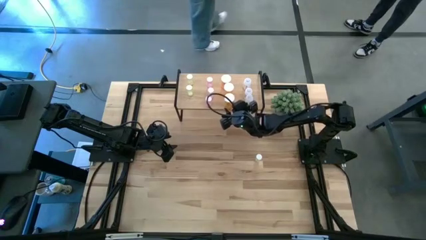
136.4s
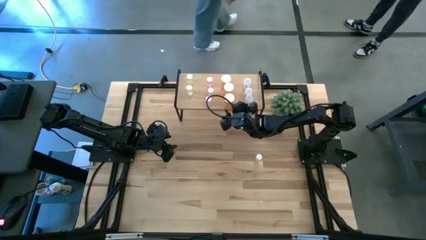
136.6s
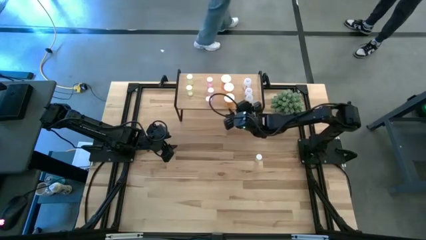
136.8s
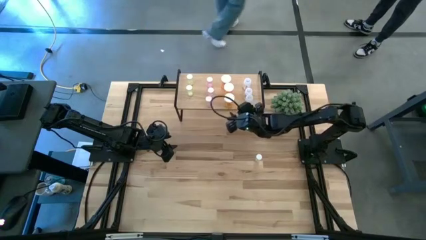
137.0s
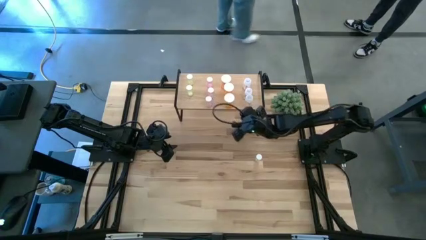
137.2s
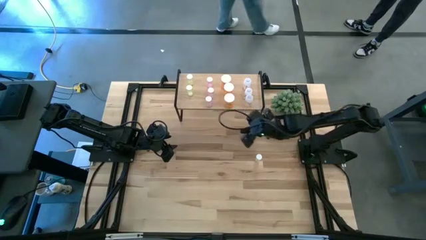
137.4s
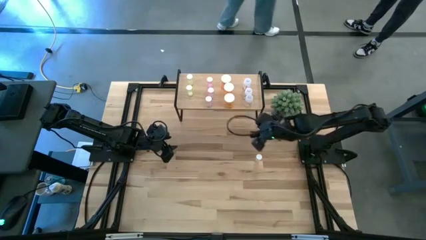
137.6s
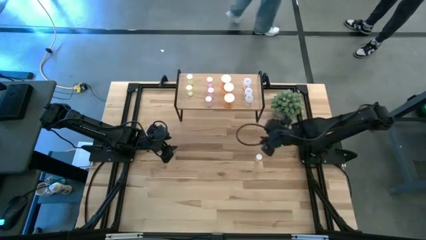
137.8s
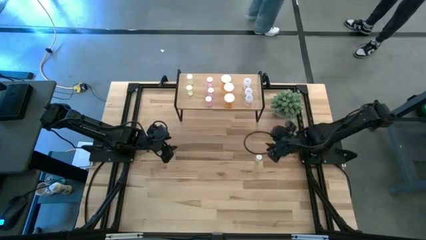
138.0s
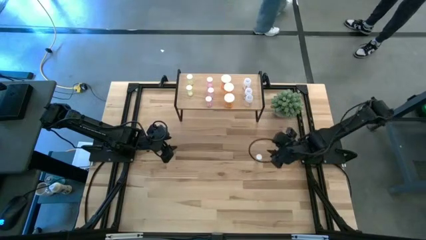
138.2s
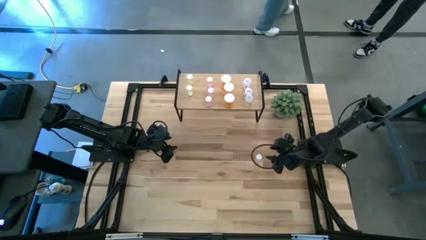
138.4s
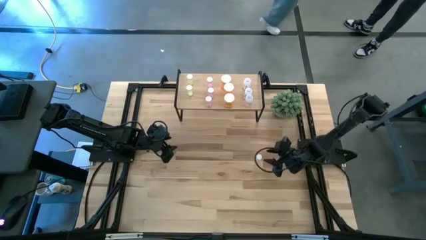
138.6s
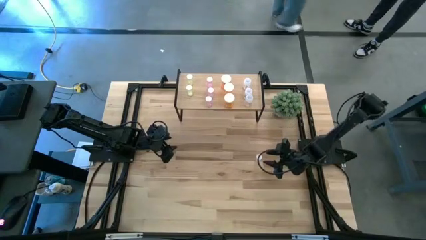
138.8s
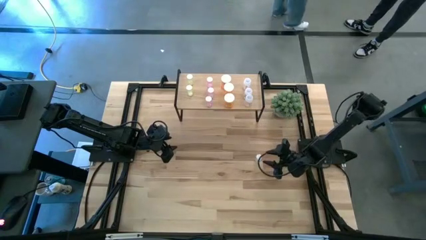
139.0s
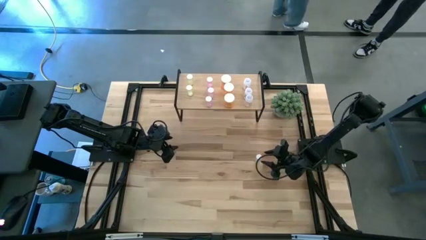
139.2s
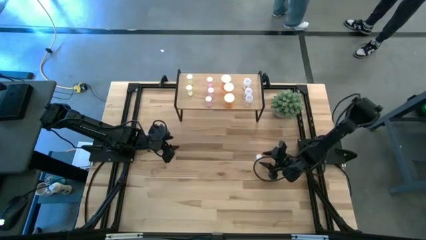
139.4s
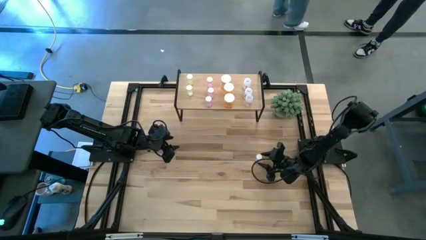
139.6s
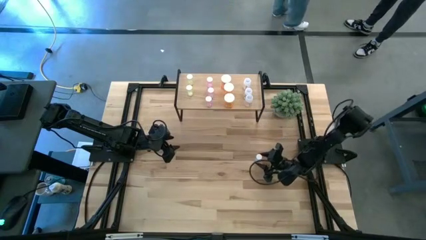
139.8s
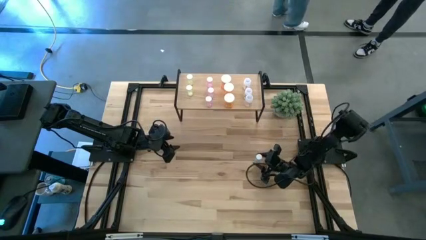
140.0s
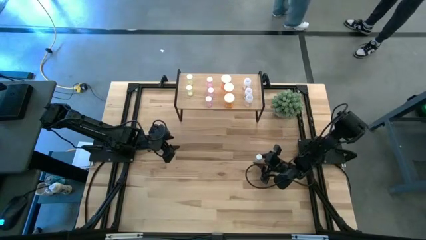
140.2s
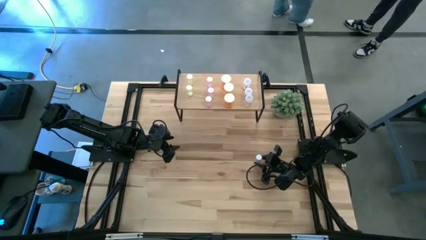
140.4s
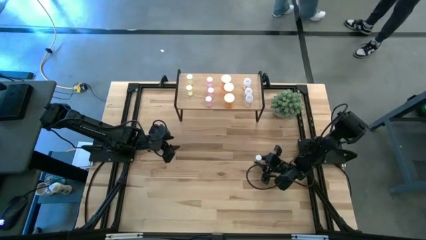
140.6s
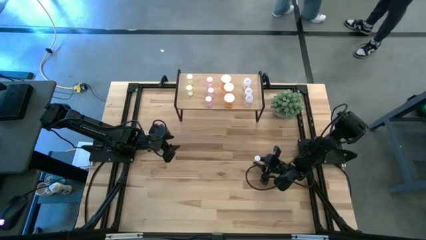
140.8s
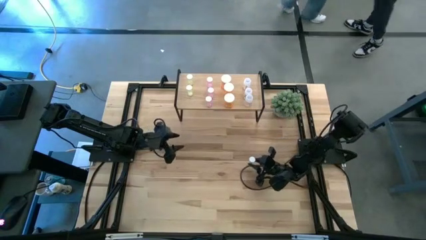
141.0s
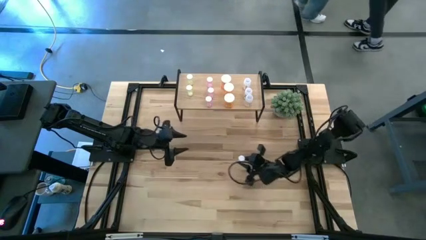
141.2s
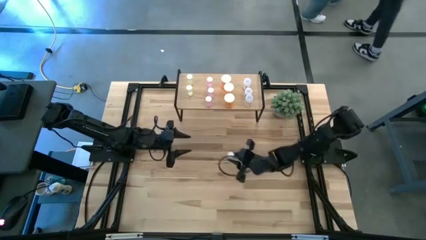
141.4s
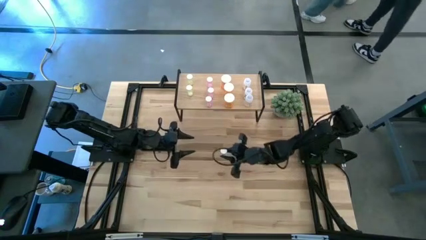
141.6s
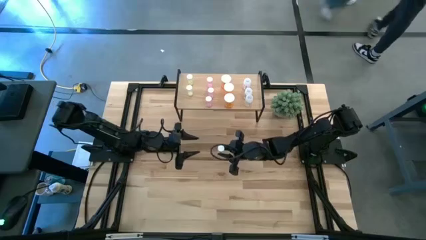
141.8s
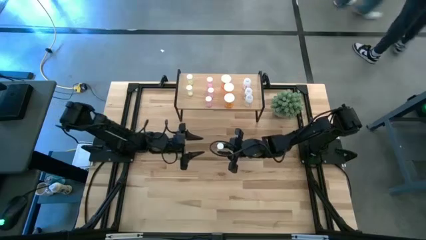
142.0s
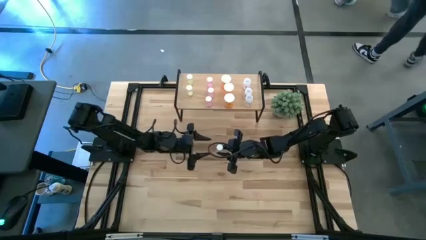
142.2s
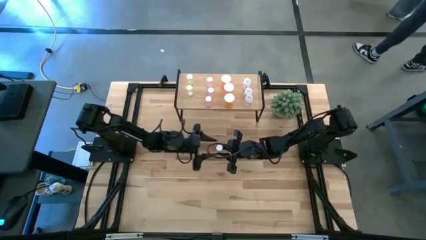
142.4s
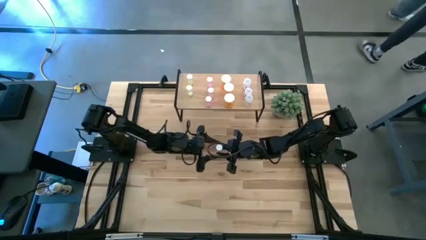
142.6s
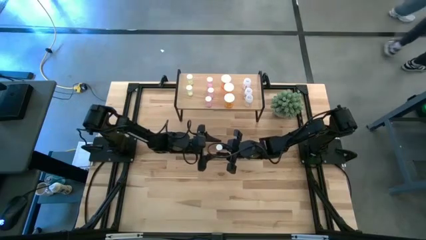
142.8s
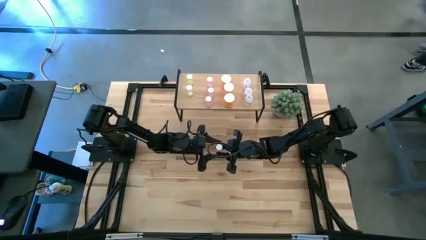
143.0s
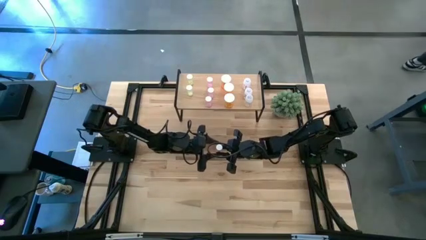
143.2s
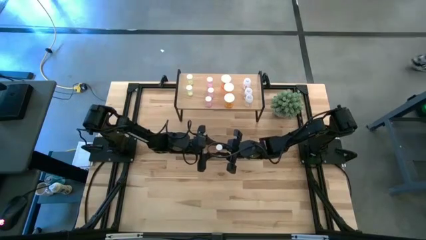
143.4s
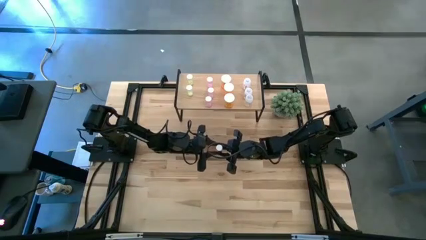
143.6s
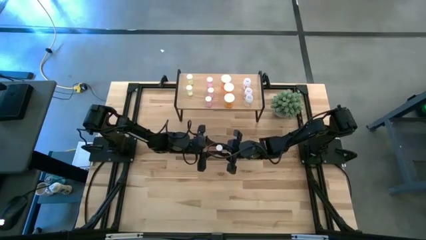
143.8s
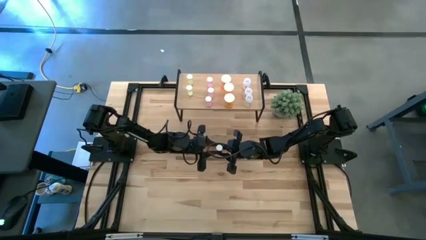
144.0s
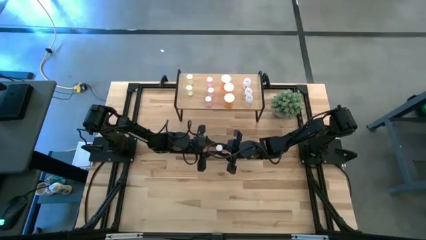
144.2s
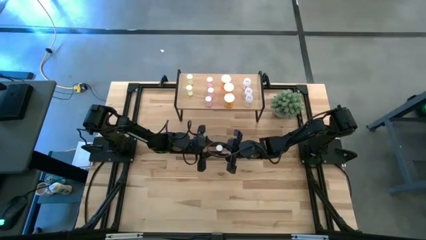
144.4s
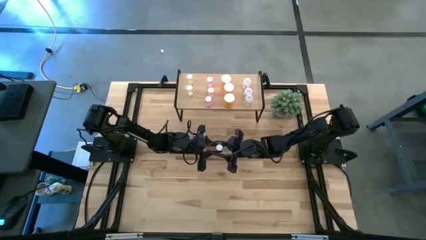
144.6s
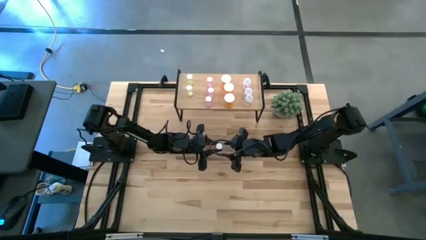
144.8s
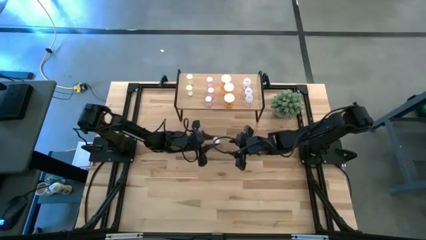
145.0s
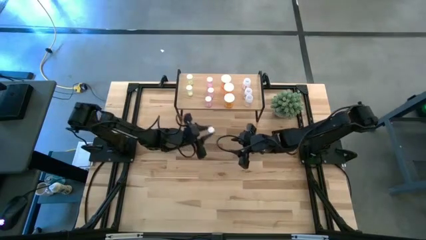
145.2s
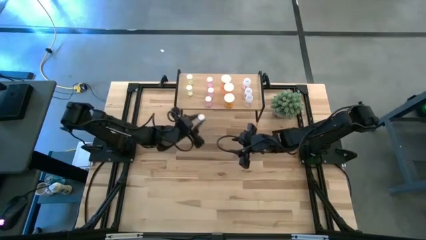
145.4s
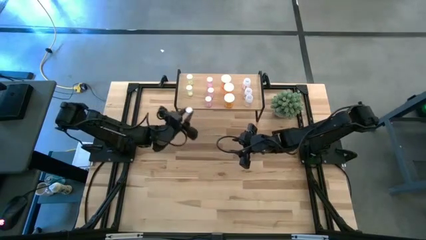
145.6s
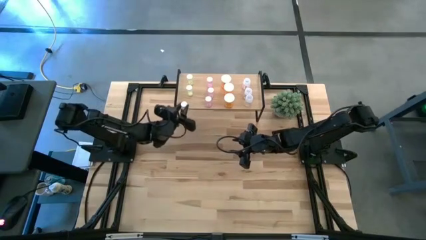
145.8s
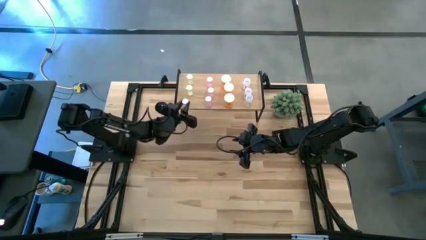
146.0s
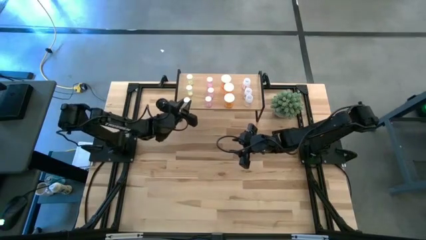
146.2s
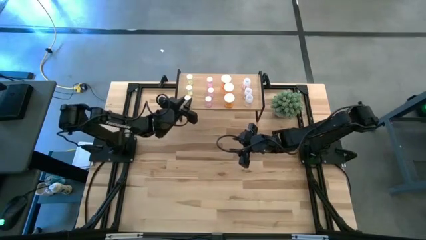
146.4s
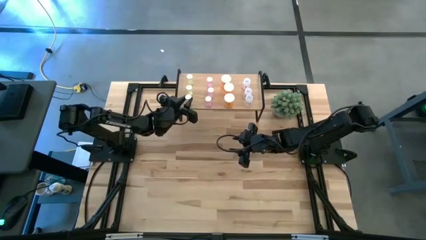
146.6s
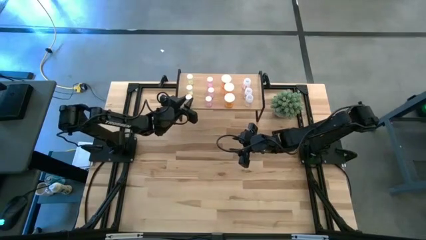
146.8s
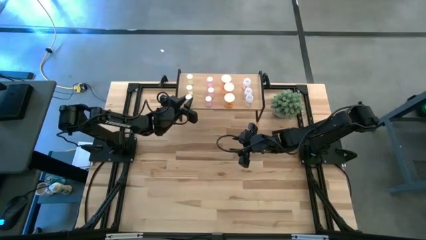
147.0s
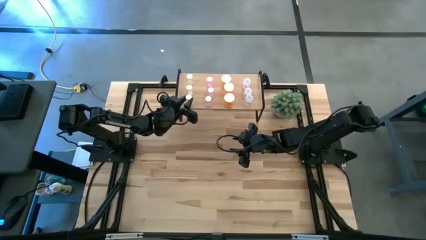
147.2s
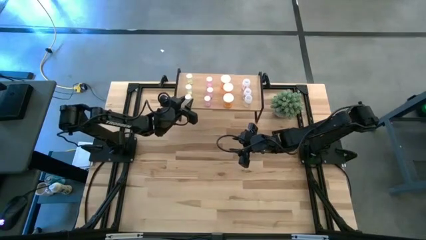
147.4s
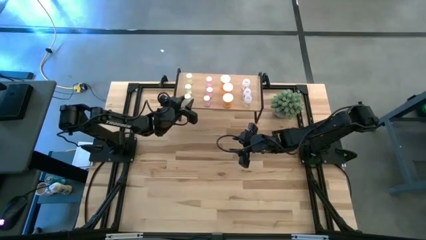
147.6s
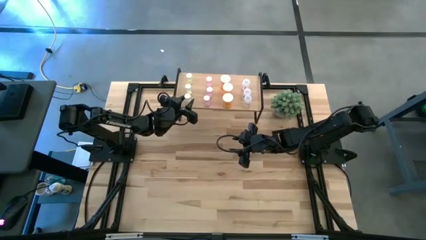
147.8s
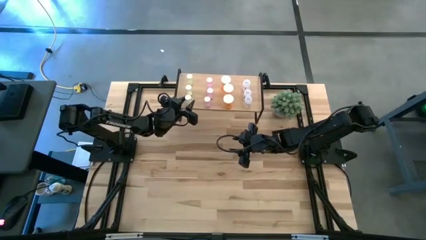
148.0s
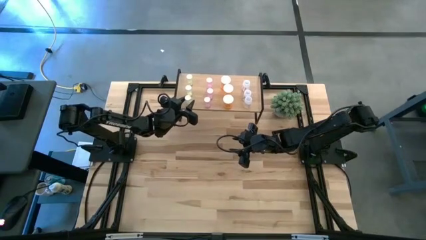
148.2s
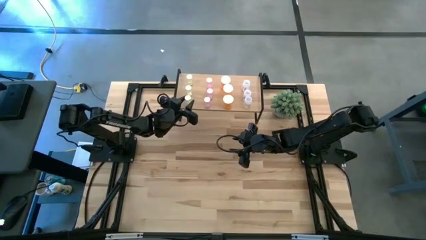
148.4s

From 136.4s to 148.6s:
Task: Pick and place medicine bottles onto shelf by color
Put the green pill bottle aligned with the other green pill bottles on the shelf

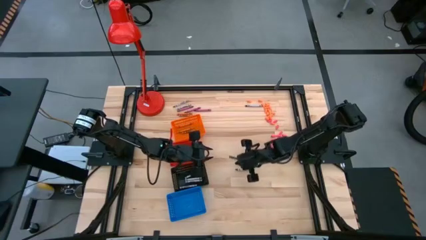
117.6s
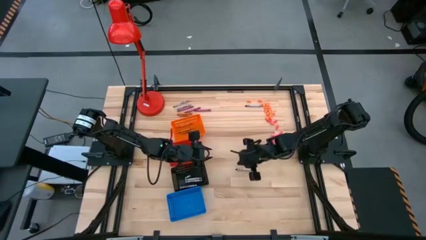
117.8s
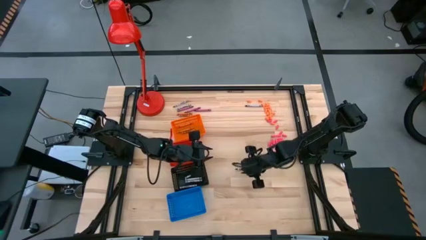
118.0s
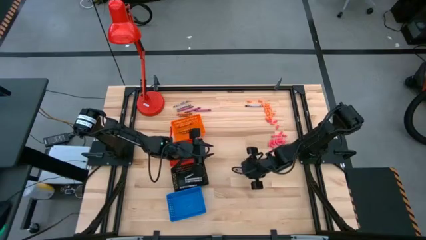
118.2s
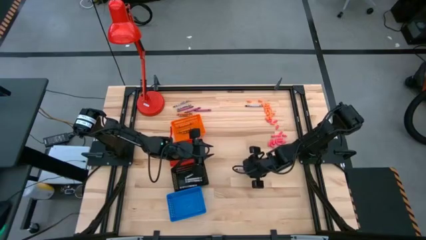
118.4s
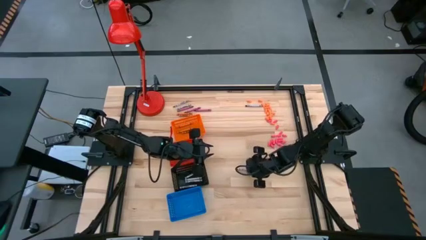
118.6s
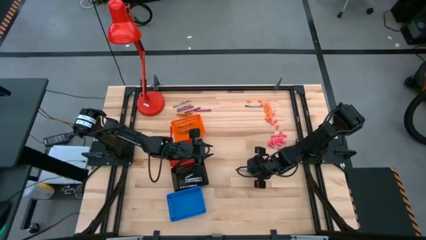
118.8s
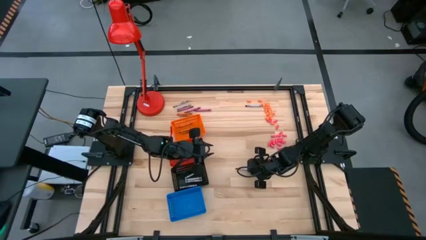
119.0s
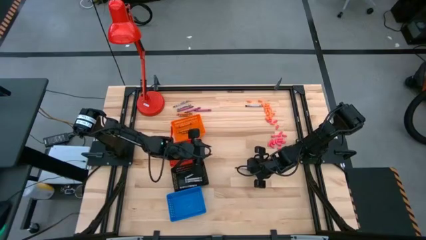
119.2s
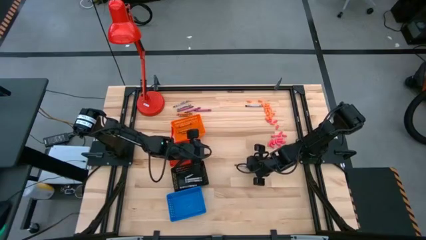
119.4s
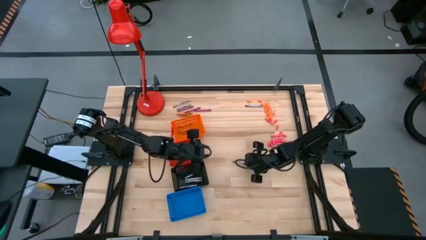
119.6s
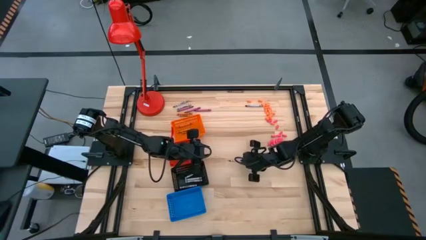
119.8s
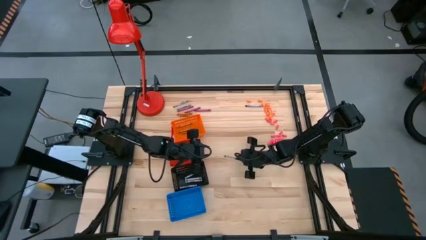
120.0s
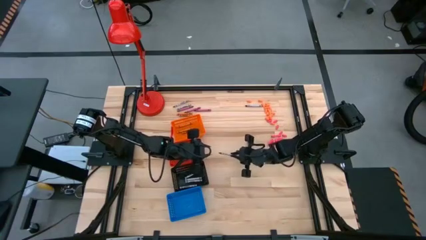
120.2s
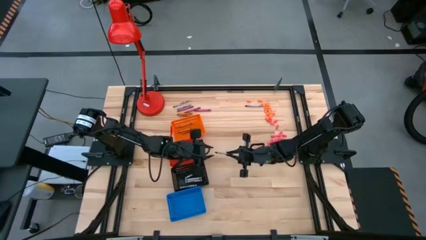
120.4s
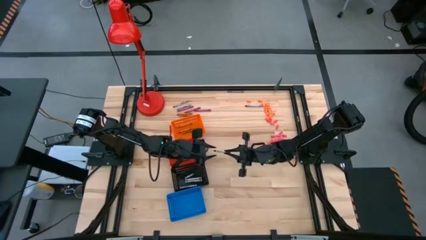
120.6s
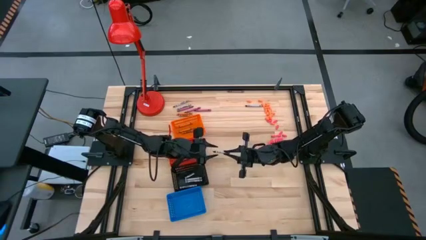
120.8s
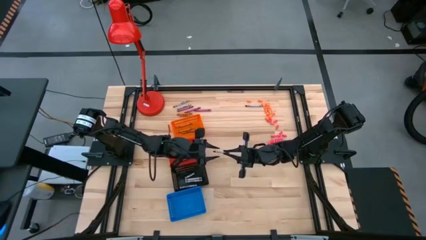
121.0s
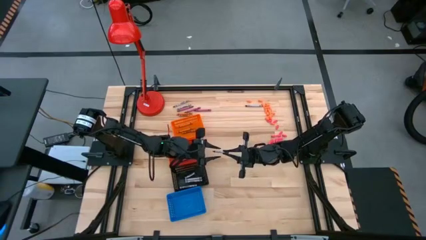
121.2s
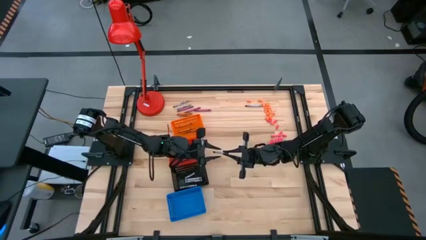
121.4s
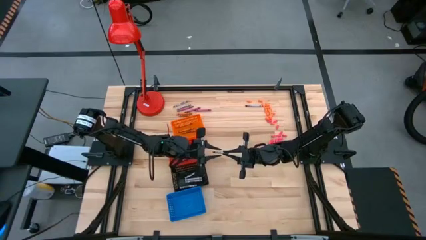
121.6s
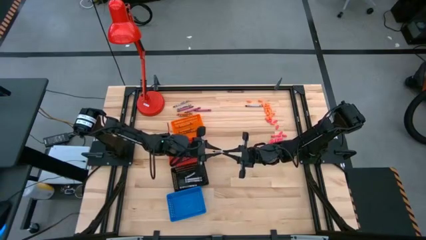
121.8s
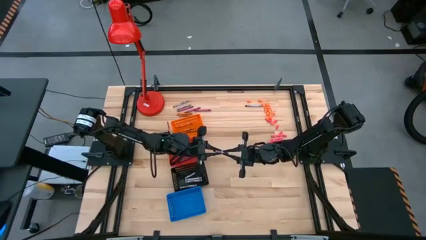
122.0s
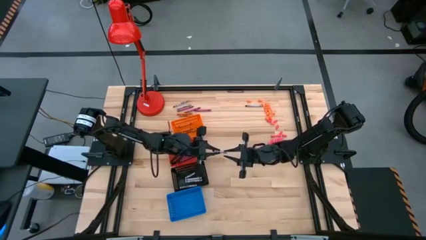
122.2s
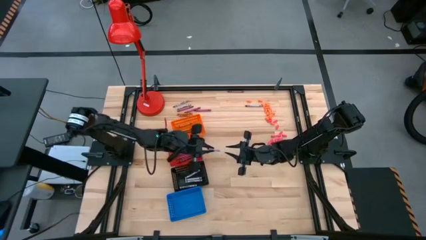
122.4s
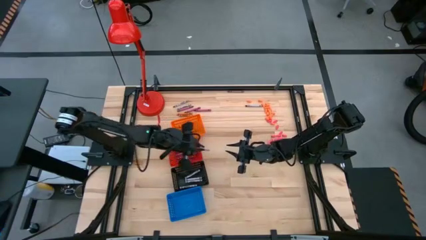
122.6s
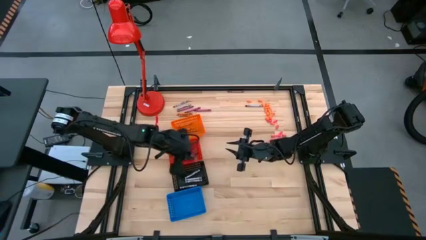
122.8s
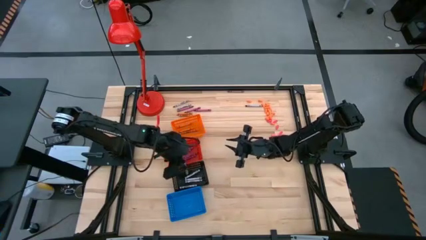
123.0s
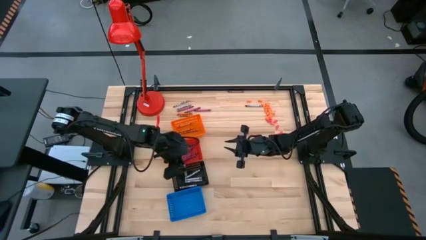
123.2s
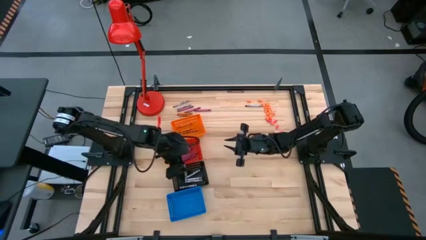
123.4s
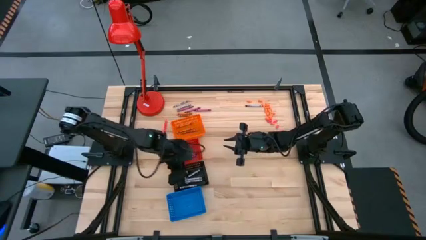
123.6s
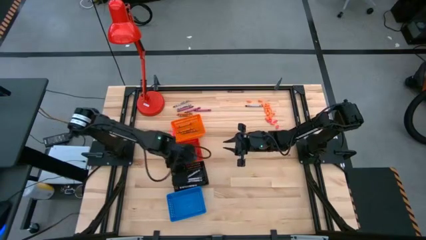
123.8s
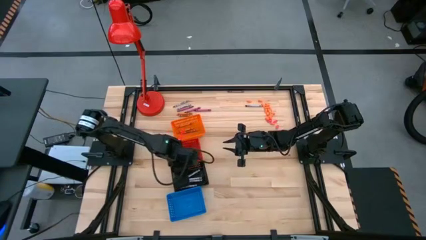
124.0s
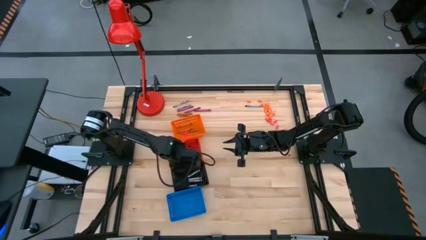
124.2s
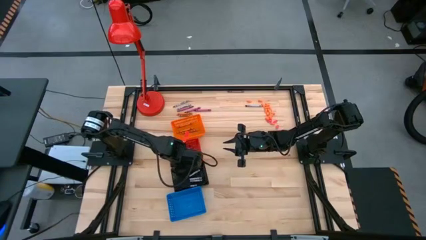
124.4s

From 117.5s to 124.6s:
Task: Sort crayons
Put the black crayon into the black basket
